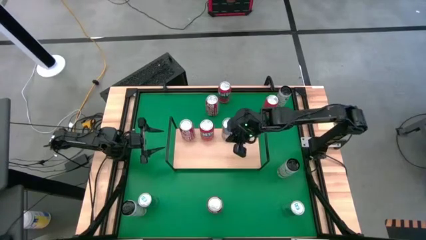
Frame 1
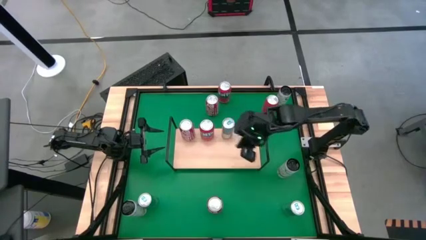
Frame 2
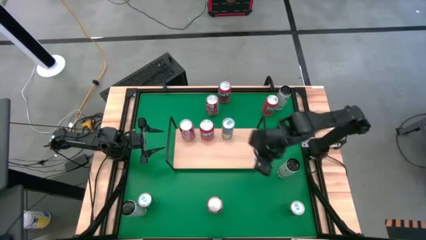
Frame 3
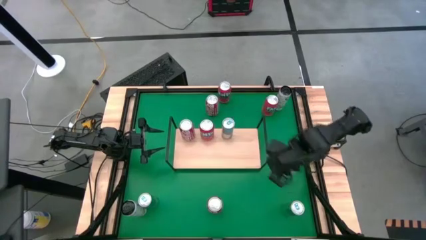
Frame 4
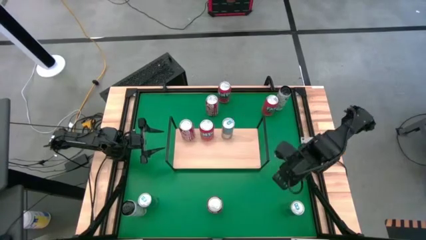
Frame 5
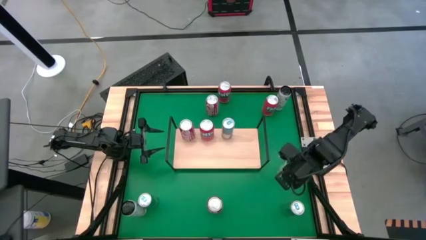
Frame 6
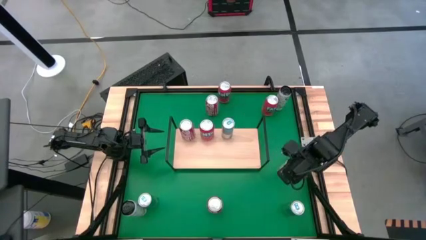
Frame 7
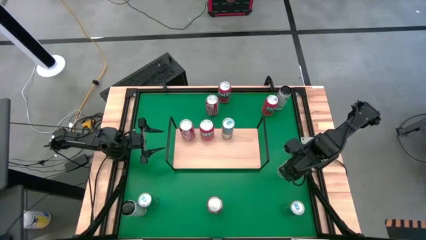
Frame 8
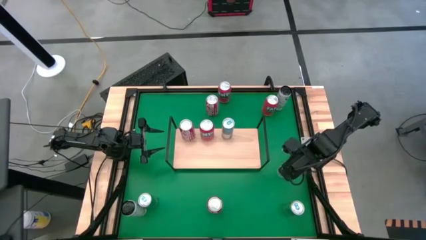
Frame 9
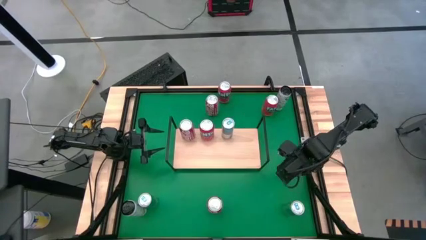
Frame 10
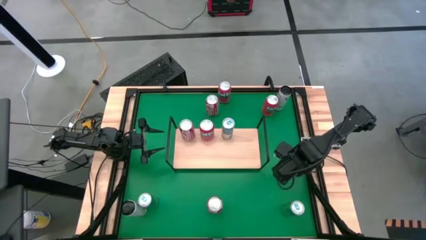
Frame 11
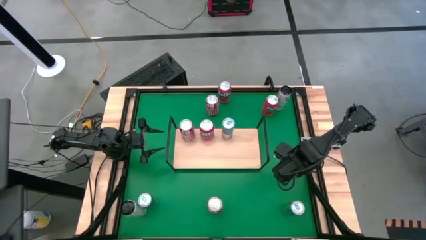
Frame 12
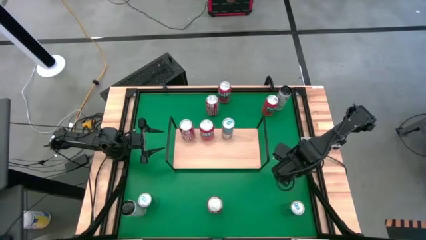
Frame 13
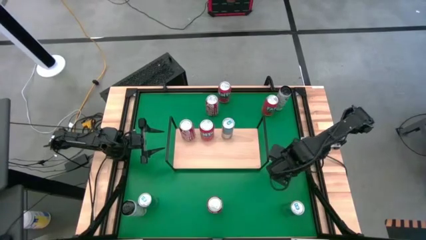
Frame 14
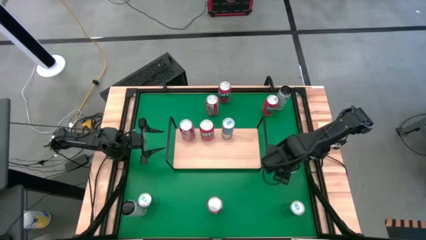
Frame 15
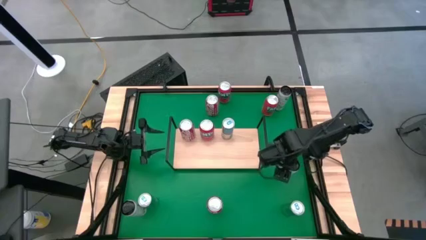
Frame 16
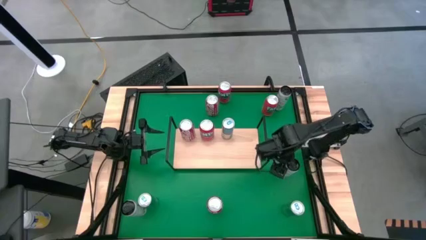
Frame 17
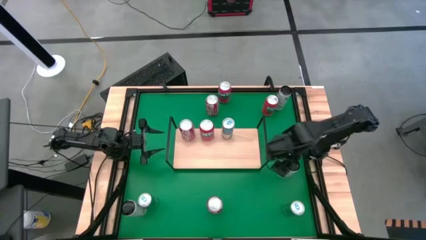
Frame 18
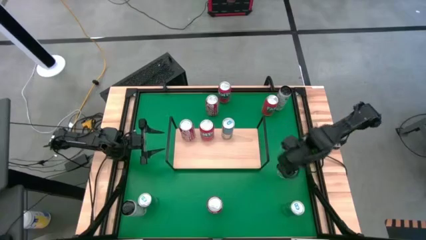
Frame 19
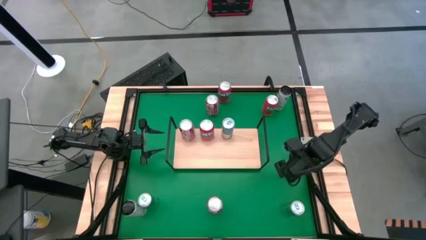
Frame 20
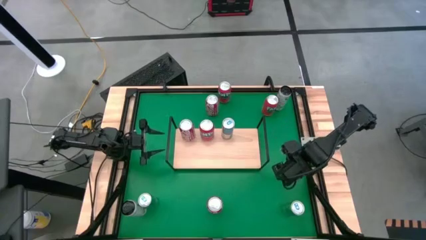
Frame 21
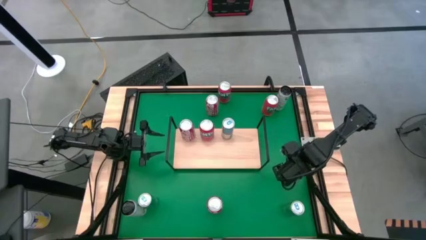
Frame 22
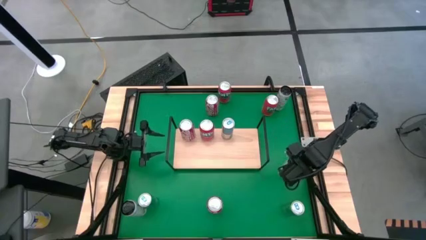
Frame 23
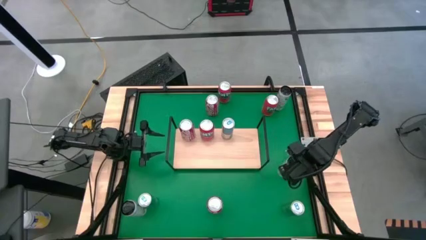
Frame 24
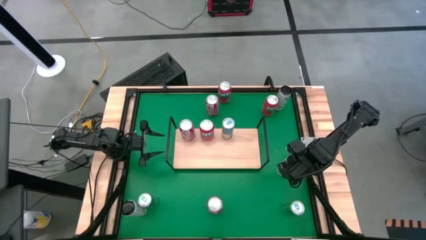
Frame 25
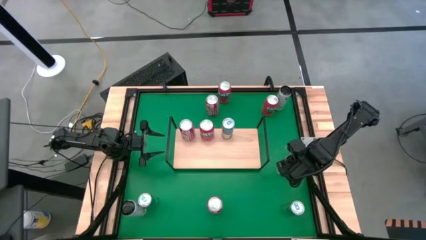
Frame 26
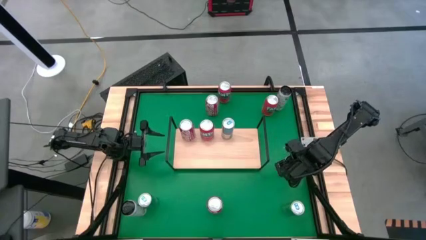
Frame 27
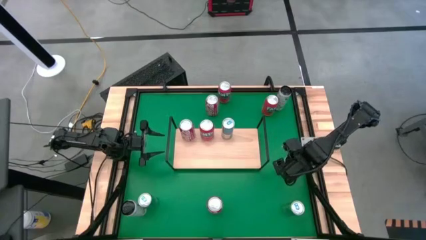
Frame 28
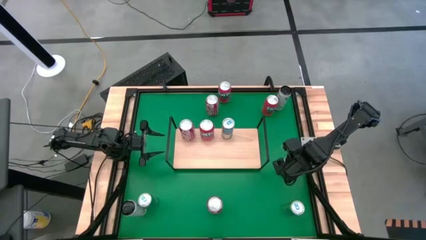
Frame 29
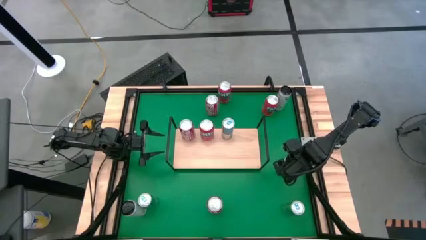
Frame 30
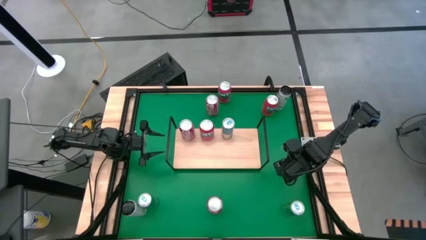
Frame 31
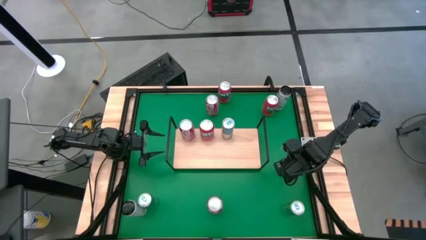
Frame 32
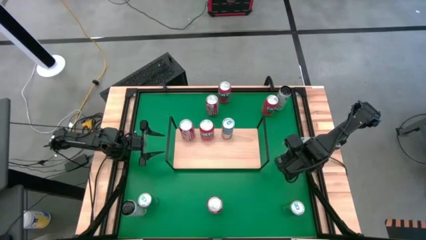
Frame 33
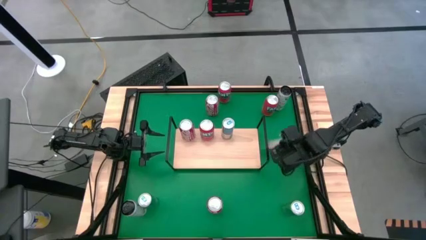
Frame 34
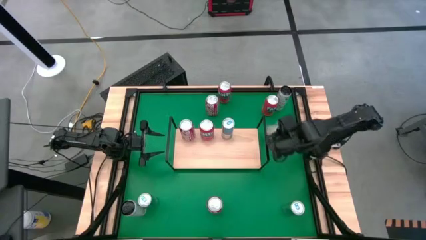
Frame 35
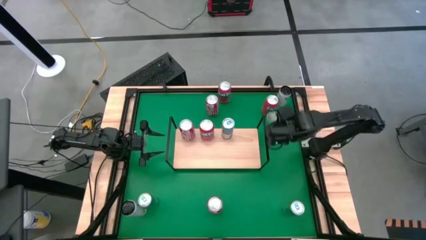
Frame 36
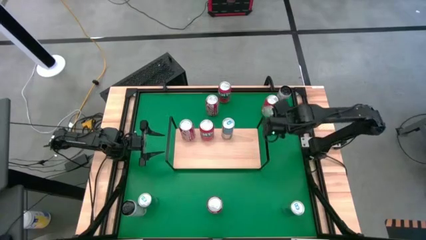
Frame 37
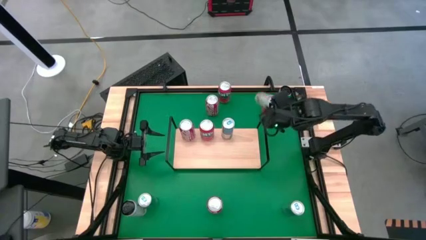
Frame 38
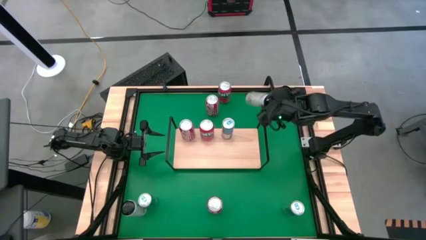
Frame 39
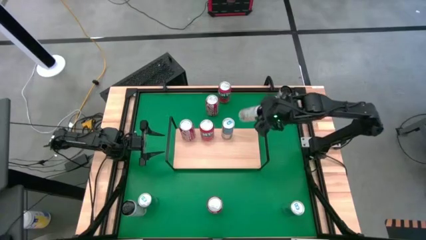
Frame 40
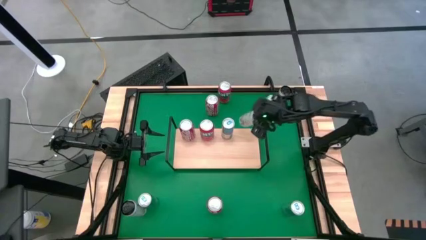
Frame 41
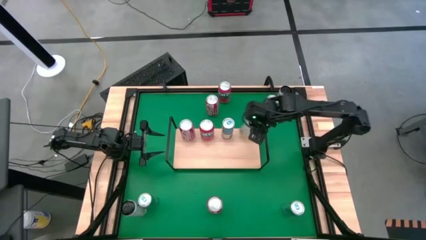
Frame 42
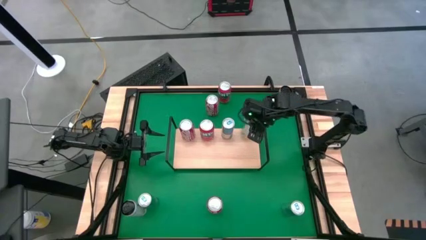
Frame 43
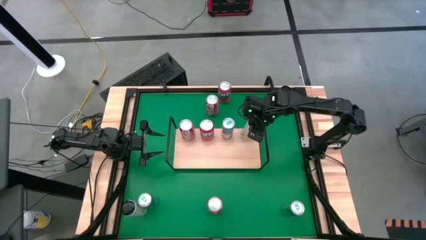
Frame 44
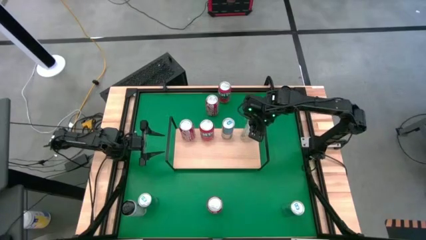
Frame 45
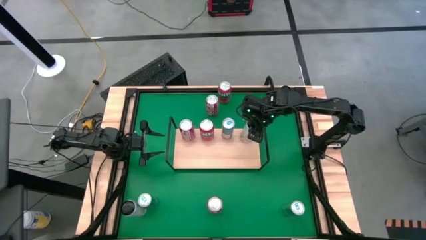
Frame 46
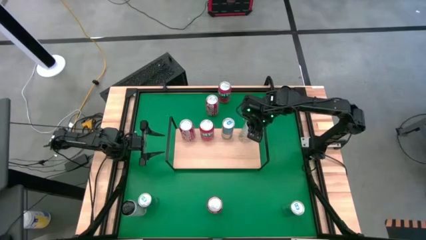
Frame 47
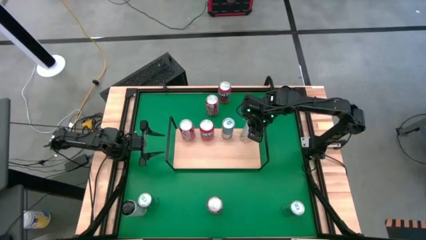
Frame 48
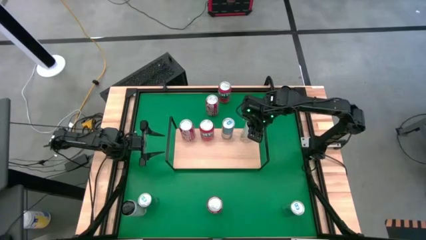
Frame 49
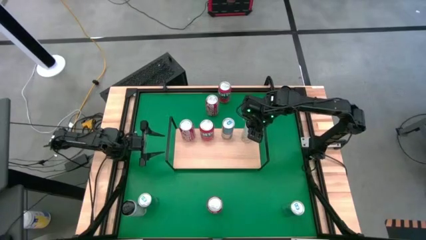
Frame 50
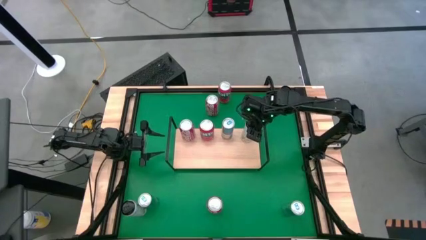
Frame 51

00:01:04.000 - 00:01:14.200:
Task: Place canned beverage on shelf
Put the middle right white-yellow soda can on the shelf

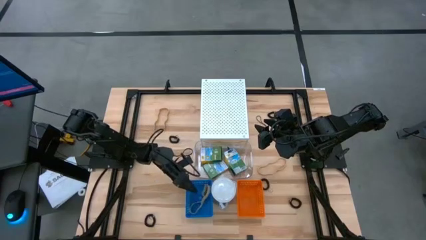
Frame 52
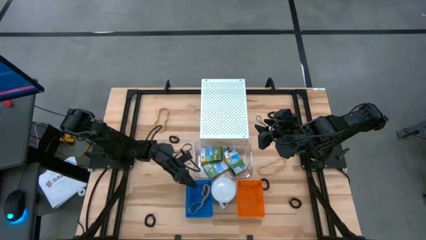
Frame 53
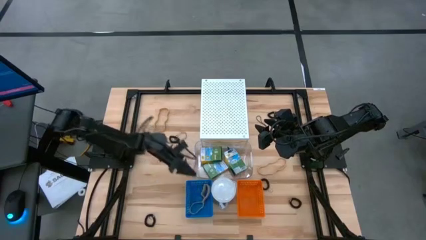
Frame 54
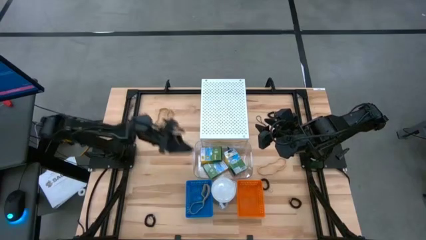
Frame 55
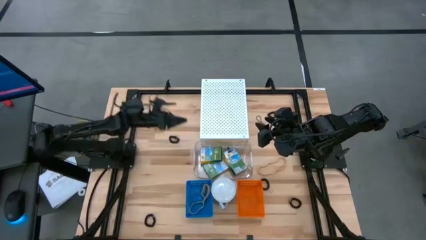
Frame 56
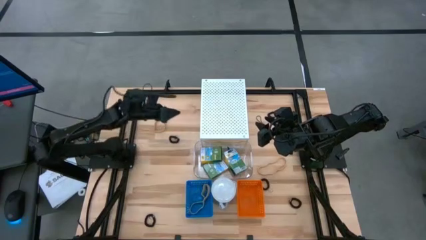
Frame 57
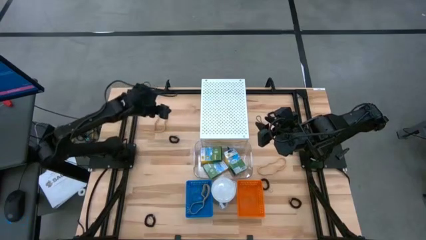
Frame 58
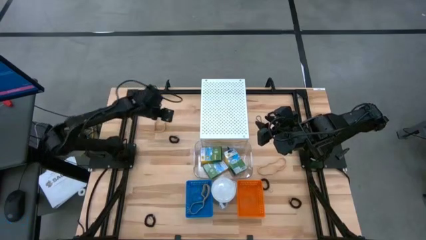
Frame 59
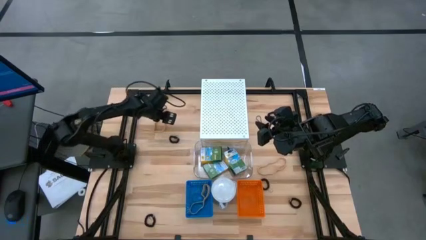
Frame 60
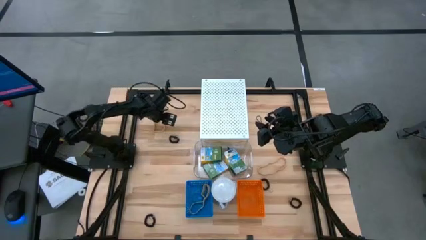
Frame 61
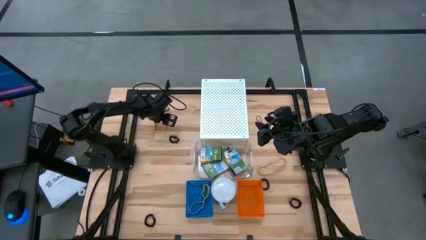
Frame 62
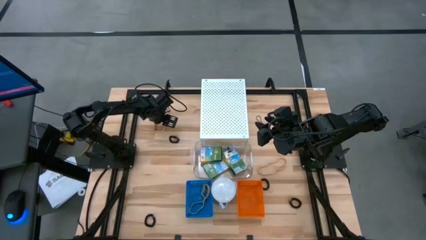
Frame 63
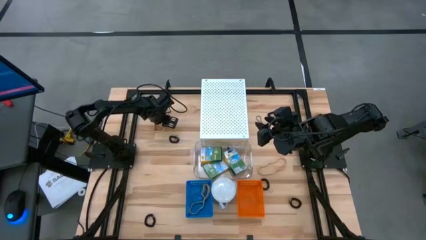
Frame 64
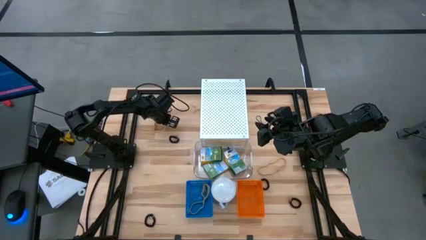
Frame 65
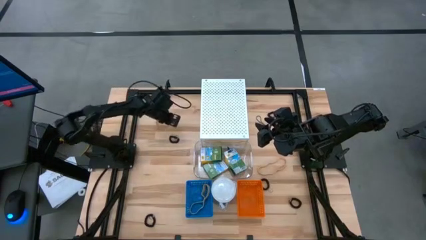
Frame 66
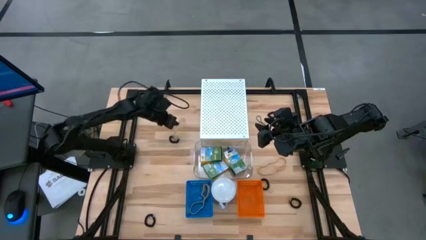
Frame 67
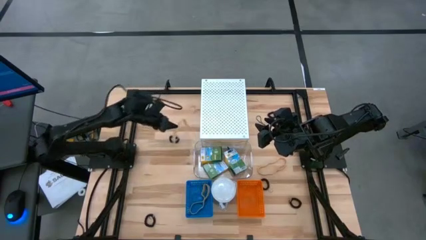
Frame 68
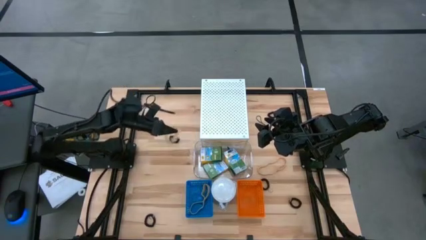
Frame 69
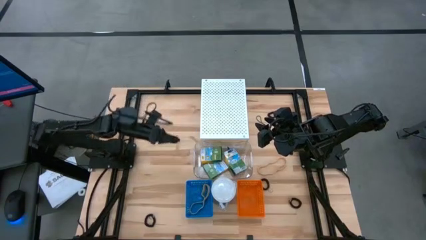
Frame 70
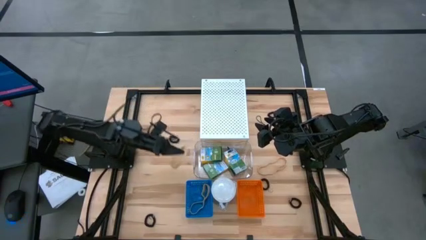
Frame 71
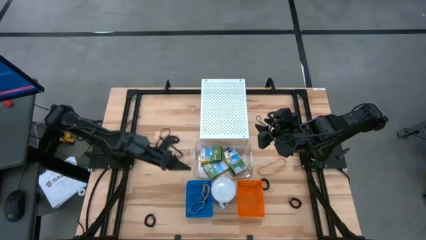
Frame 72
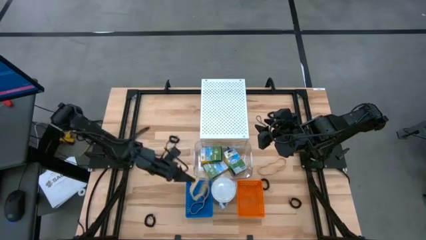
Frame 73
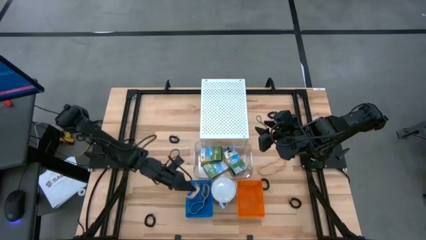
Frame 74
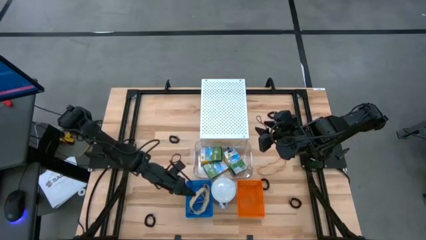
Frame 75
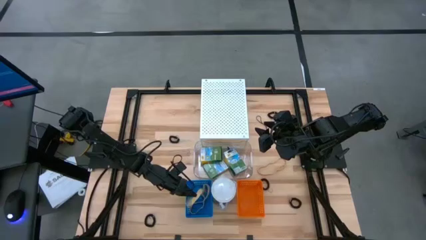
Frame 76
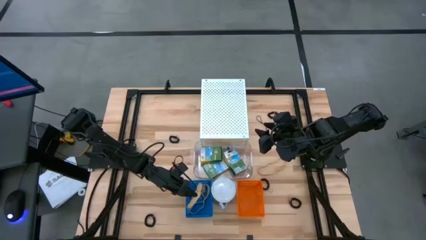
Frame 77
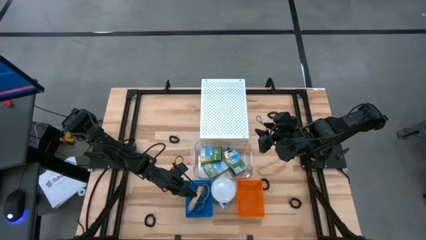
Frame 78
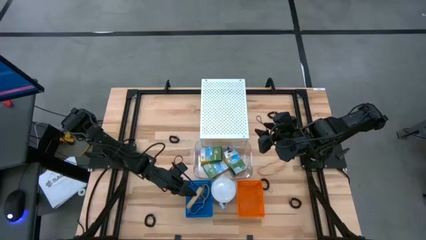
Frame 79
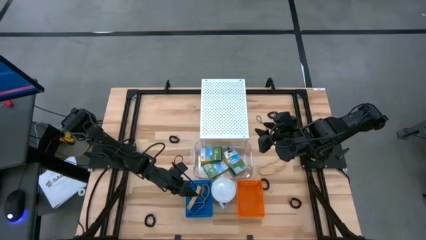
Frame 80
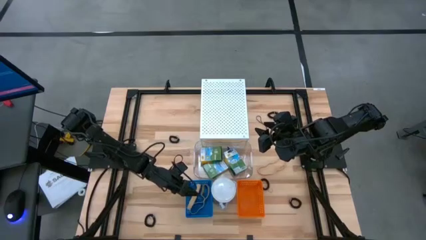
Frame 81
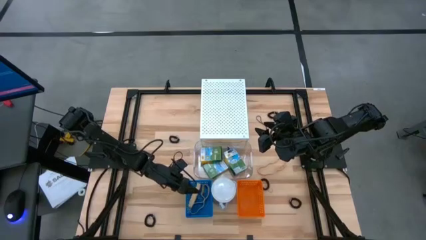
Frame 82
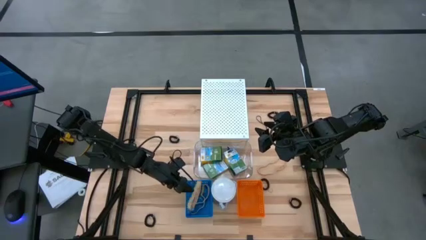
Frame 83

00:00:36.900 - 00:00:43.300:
Task: Pick & Place Office Desk Supplies
Put the brown rubberband into the blue bin
